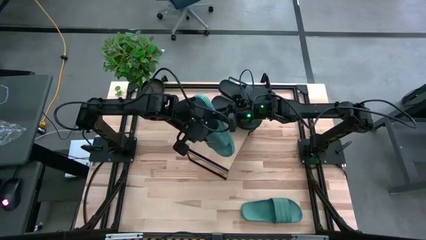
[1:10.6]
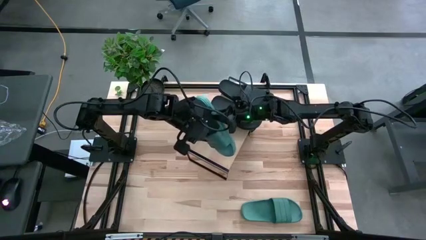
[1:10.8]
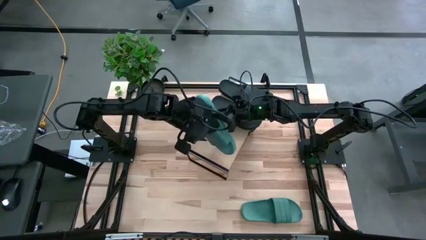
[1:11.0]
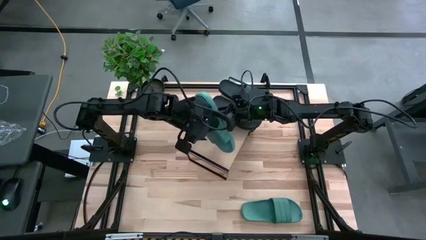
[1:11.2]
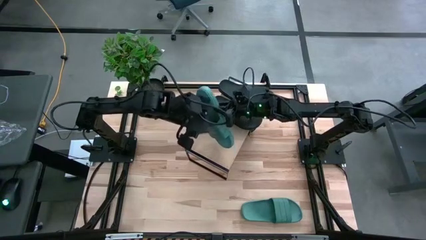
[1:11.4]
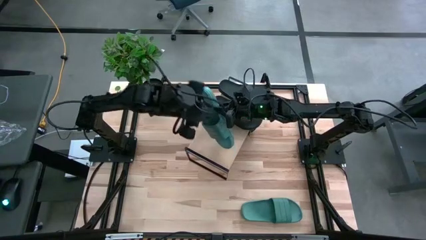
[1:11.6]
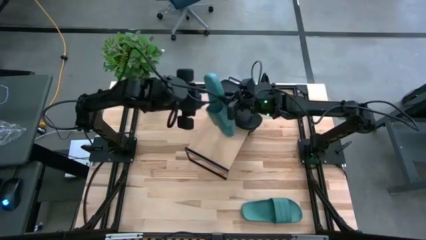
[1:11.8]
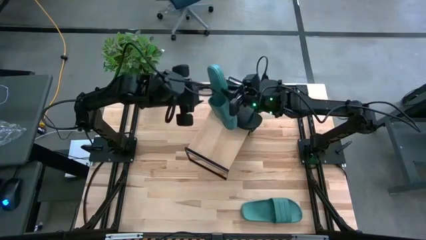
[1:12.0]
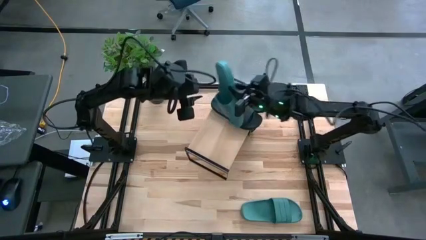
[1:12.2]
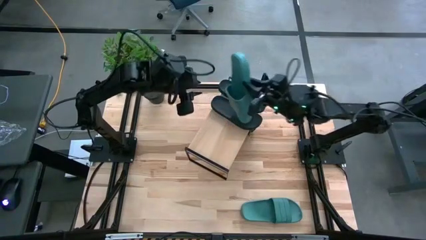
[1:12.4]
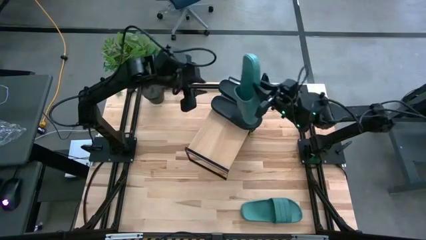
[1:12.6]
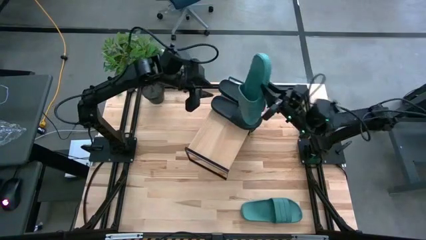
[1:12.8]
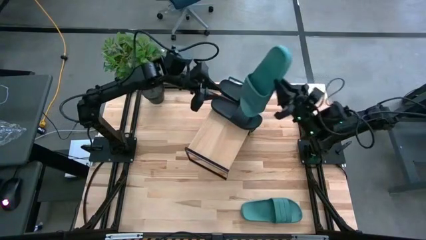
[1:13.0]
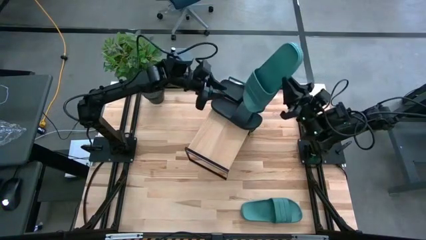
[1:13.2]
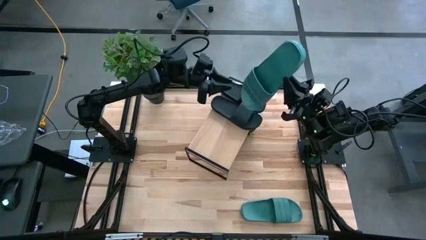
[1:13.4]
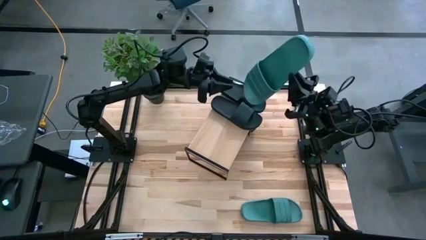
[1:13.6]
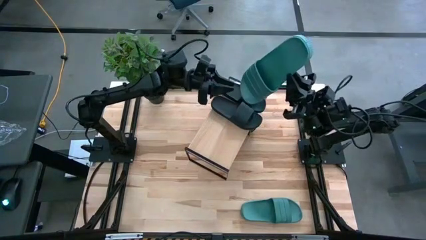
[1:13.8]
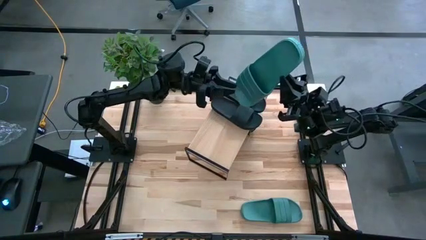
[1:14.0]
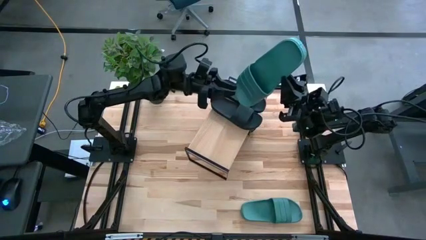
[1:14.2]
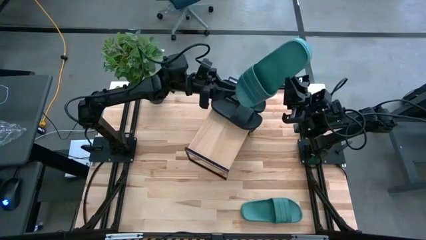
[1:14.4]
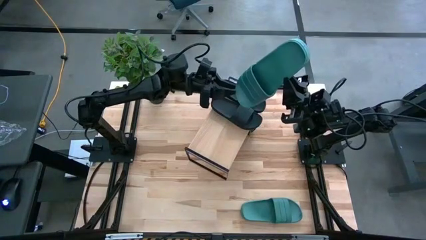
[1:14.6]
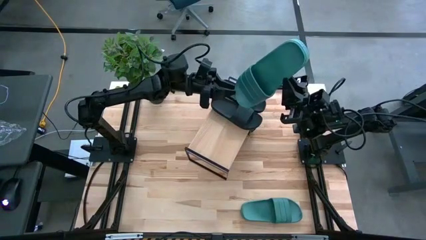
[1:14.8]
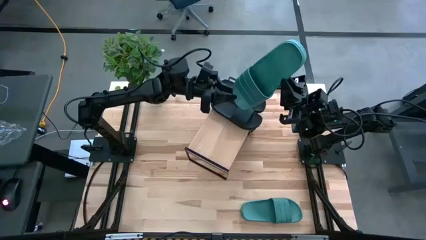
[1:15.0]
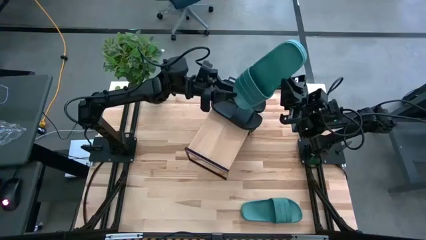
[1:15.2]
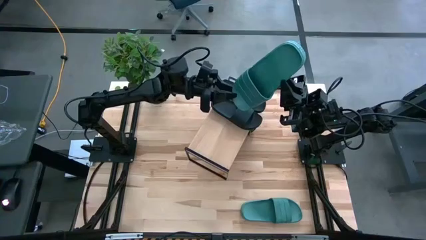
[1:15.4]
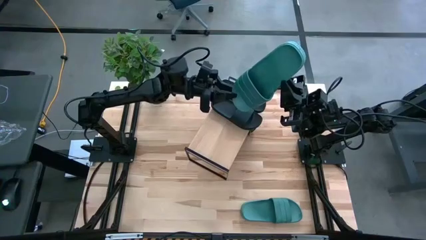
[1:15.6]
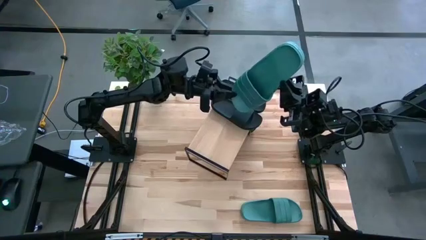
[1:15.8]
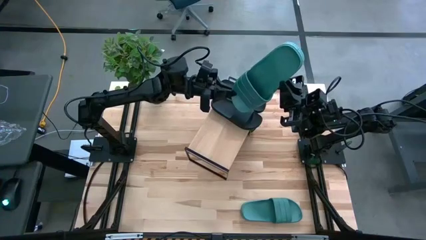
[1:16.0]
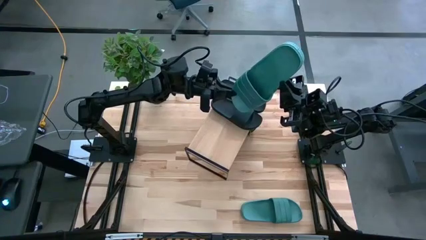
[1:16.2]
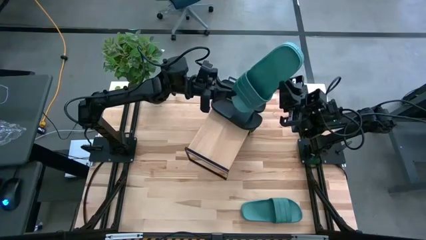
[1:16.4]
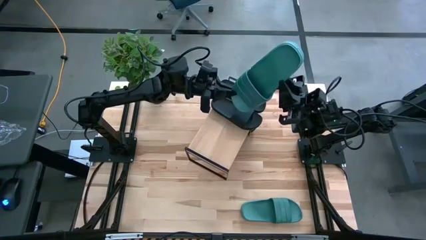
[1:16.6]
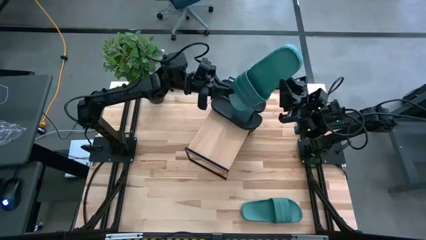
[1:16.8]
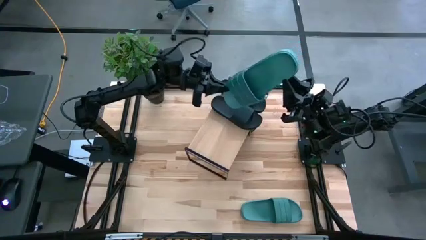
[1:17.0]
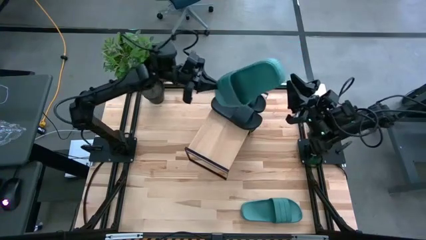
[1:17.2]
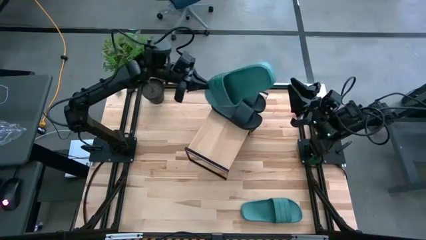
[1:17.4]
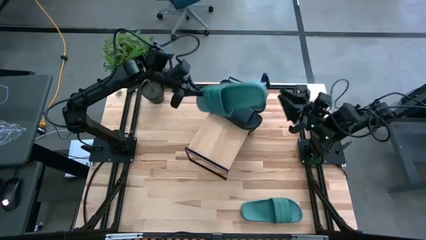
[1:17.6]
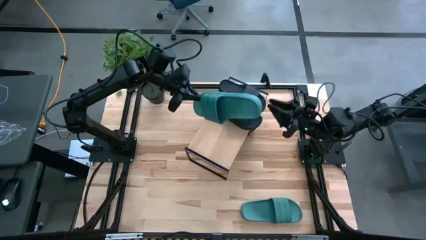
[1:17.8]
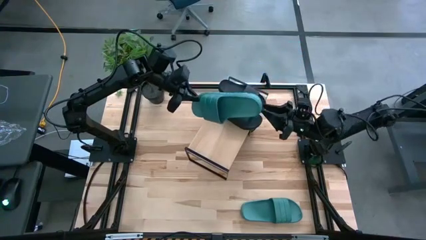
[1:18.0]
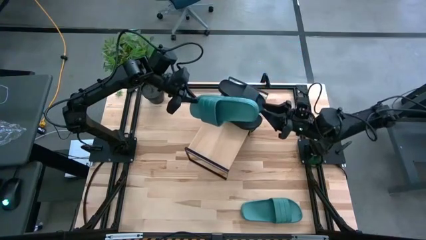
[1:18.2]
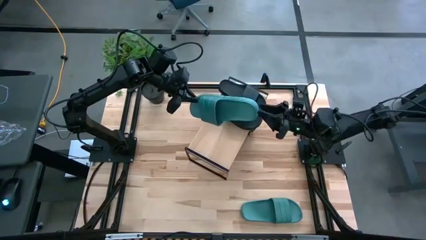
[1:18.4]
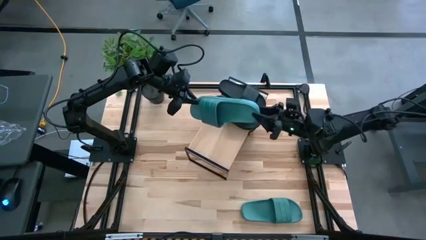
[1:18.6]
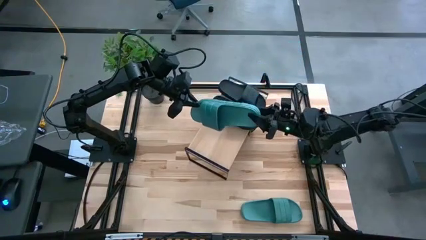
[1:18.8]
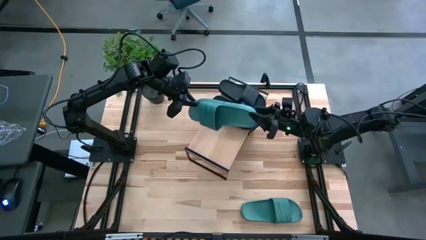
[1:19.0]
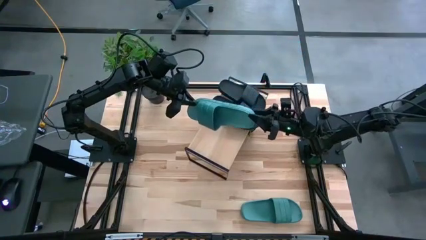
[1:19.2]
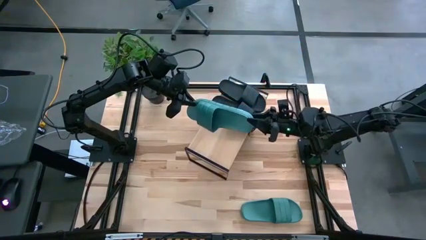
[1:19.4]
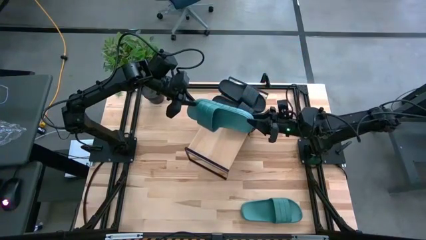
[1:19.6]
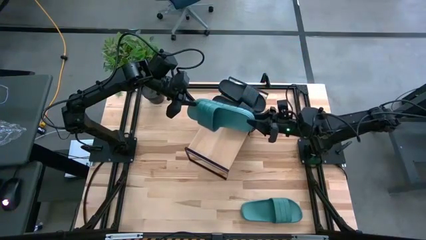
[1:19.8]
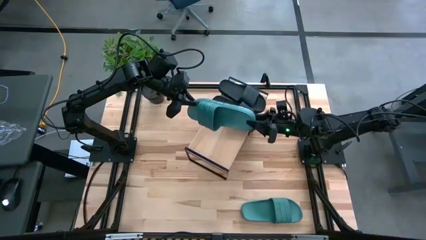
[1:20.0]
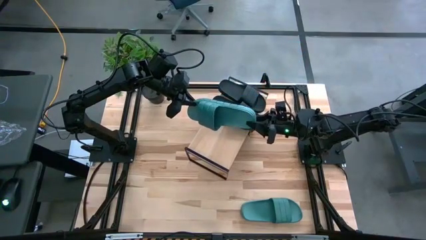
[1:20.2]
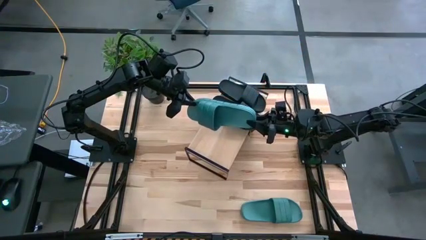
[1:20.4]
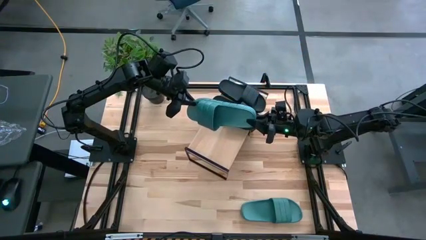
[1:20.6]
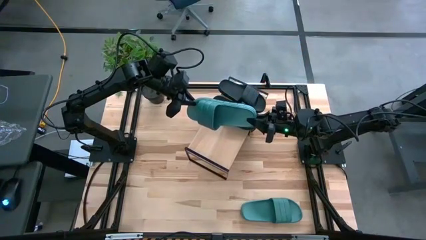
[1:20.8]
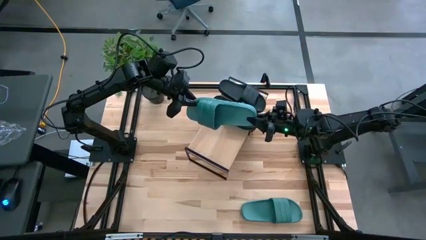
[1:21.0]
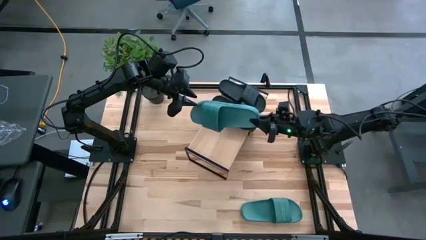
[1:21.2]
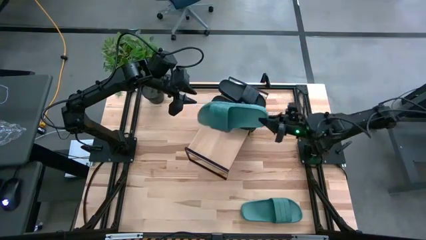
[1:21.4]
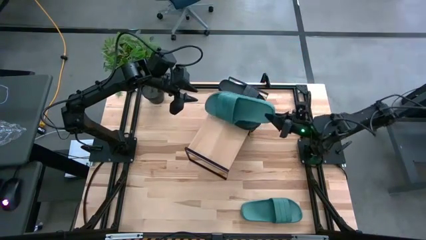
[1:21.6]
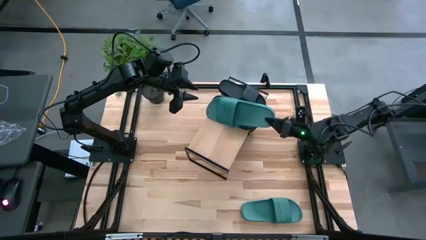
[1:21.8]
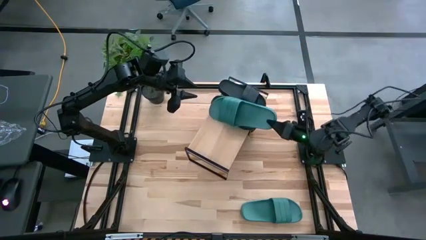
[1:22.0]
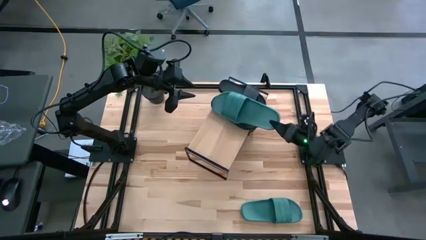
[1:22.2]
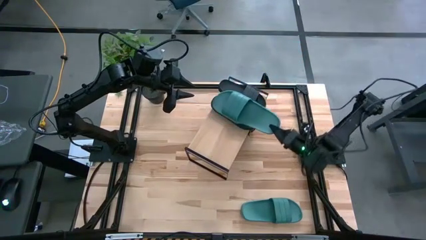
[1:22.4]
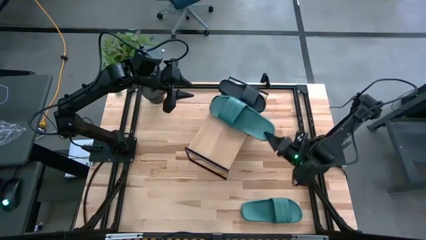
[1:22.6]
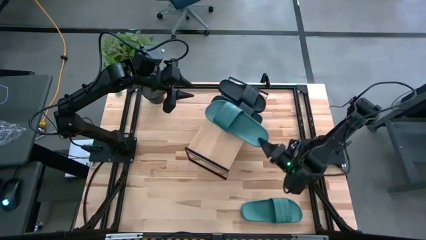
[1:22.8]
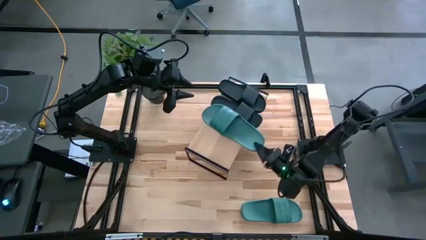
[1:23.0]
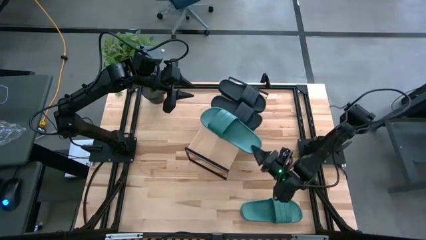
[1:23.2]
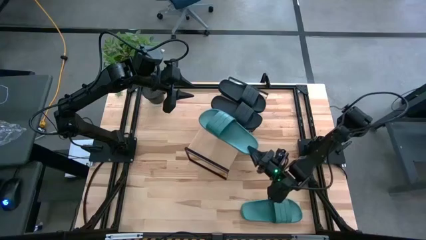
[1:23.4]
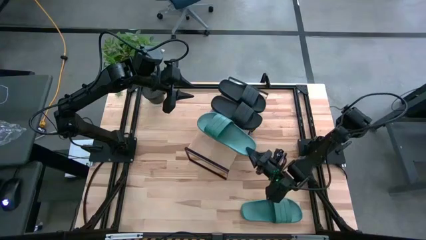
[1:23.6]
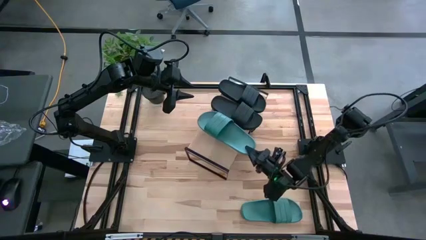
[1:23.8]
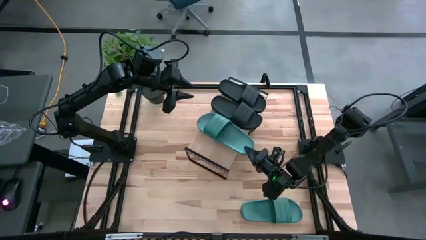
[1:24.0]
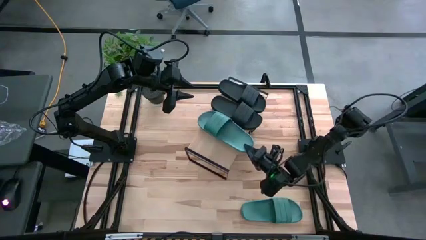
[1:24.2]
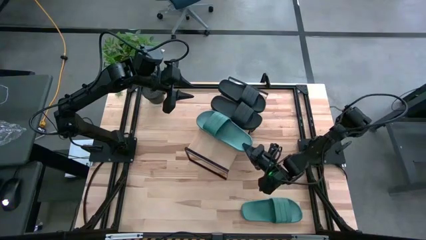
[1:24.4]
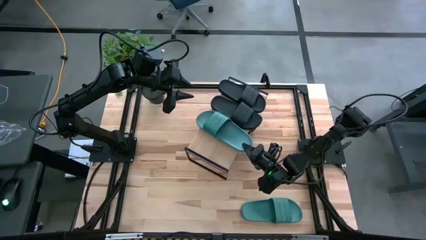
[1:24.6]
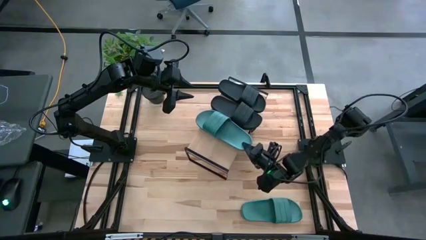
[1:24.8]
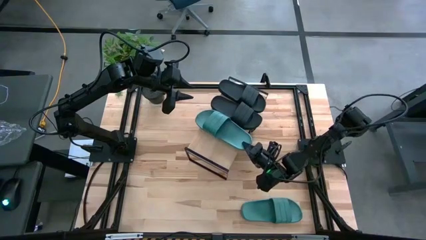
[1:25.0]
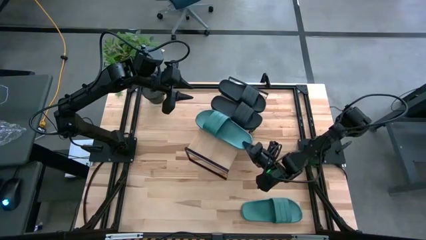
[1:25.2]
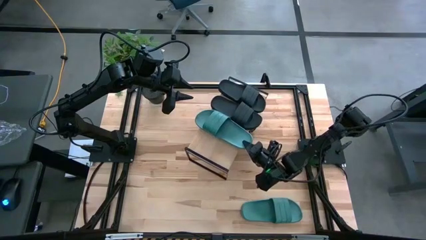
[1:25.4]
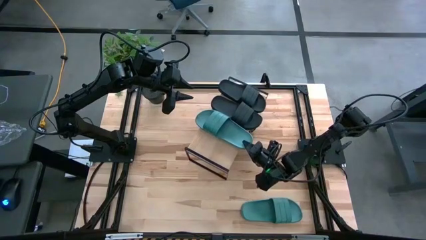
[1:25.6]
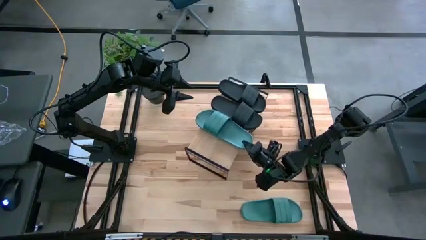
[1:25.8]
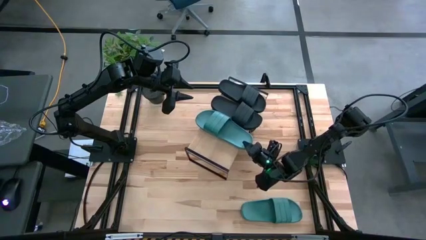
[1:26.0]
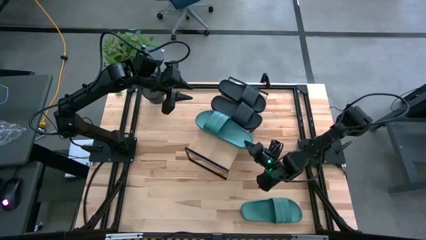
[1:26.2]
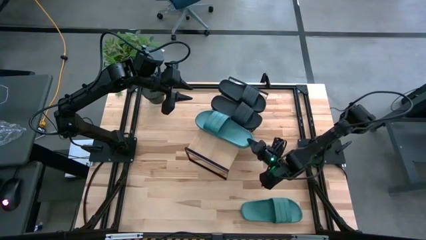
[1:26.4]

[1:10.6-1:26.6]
Task: Pick and place slides into the shelf
Put the left green slipper on the shelf
